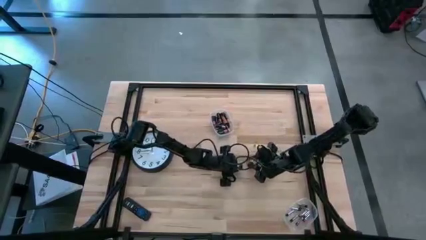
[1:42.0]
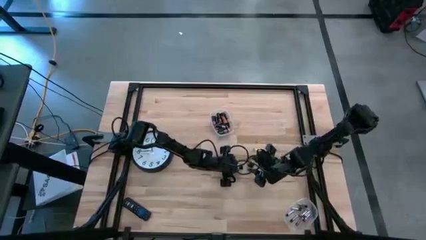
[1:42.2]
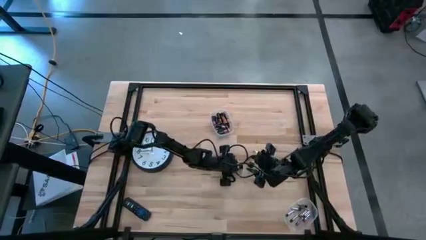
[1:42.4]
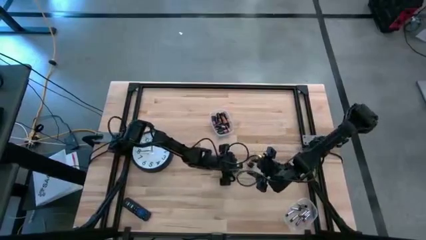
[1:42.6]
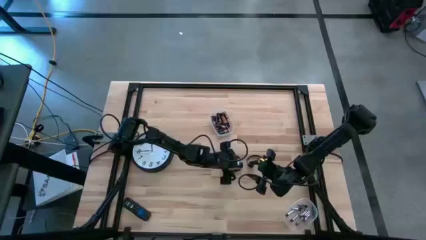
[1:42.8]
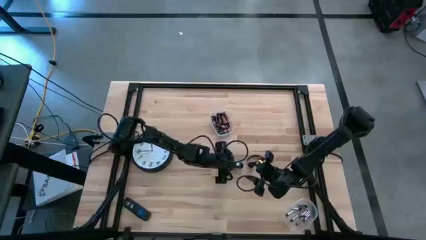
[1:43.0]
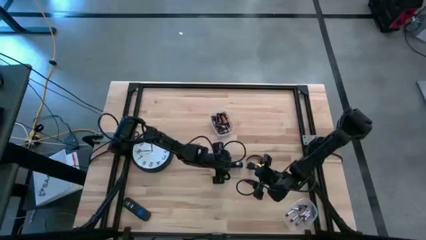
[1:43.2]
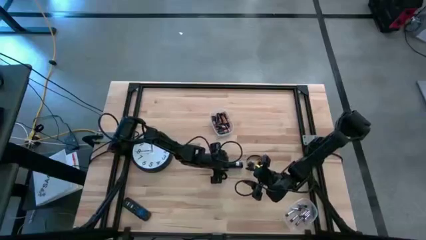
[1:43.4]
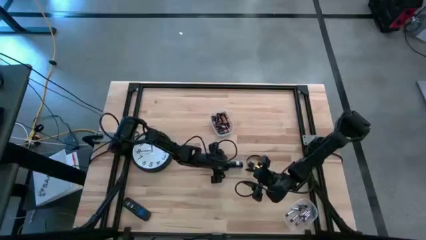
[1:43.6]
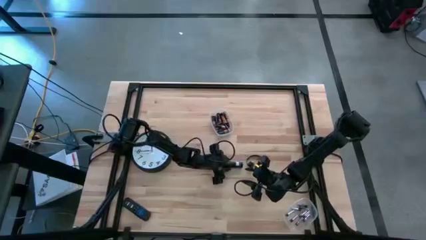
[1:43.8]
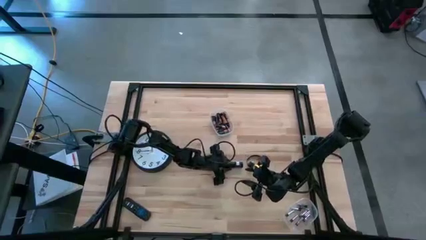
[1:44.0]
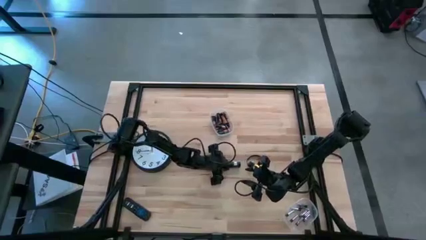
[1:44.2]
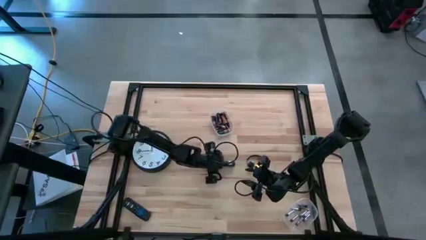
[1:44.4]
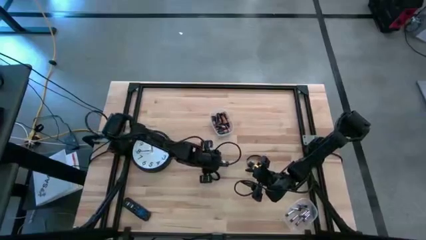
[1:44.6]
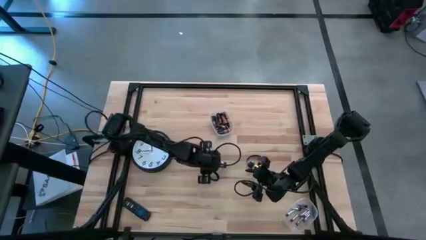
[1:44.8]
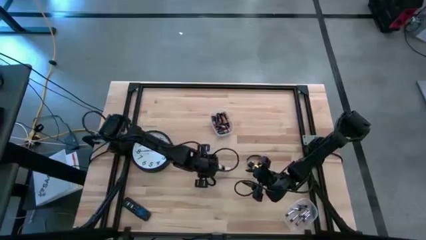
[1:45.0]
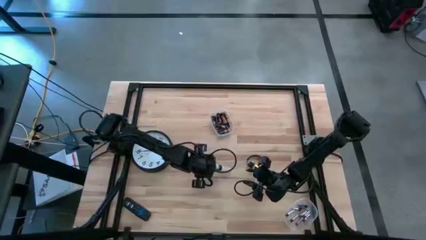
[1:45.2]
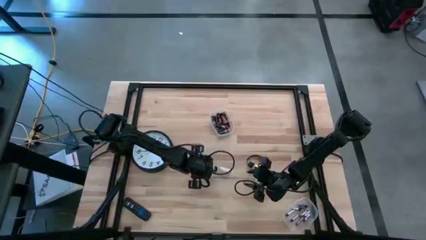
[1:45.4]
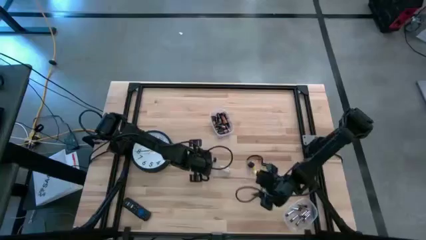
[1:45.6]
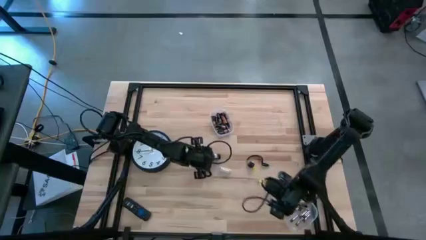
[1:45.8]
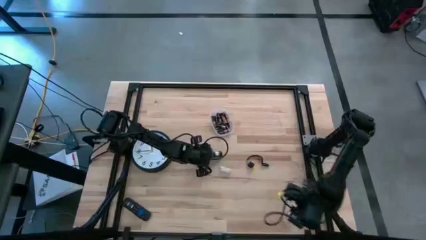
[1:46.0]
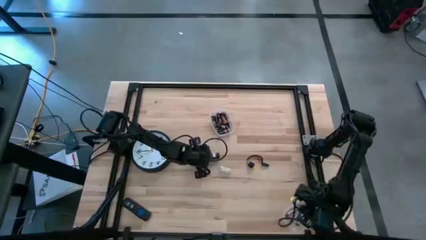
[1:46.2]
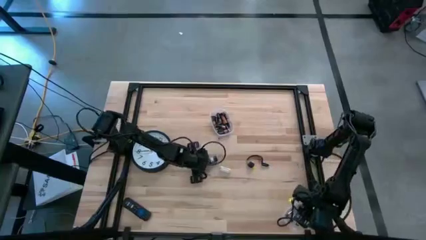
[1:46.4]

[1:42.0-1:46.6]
Task: Insert battery
Remove the battery holder of the flashlight

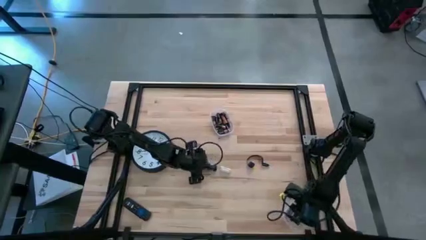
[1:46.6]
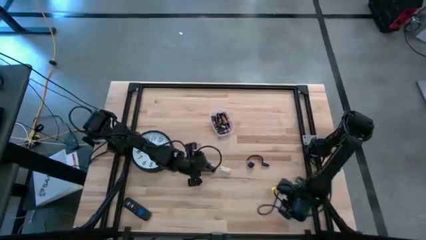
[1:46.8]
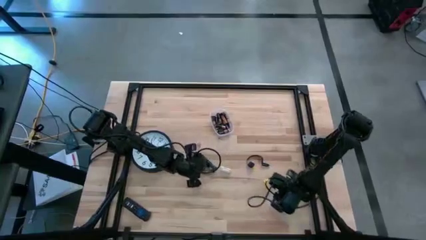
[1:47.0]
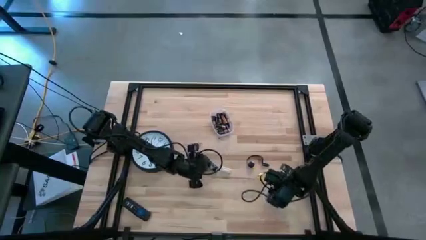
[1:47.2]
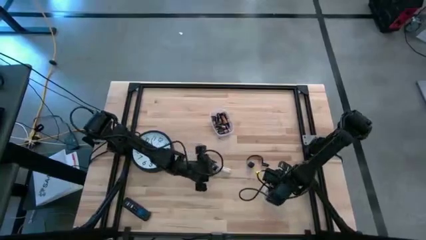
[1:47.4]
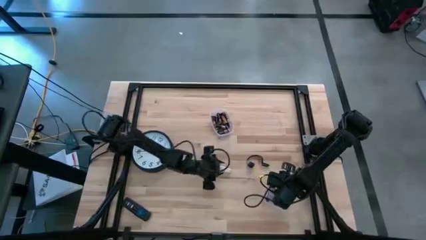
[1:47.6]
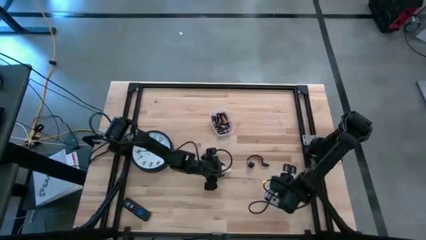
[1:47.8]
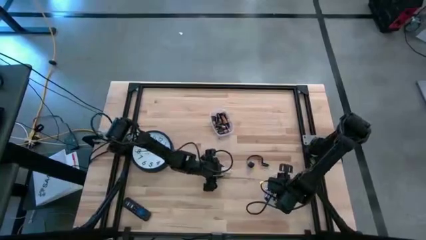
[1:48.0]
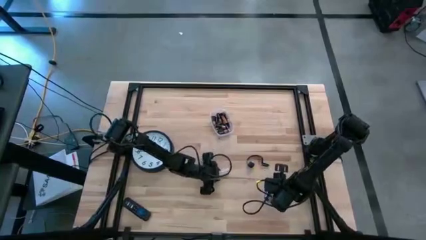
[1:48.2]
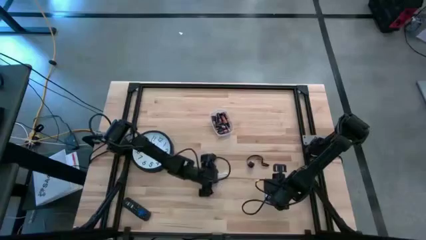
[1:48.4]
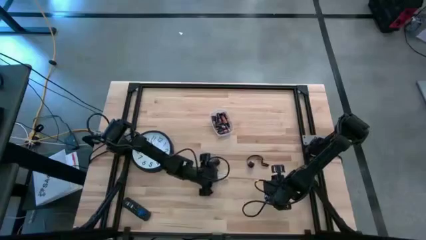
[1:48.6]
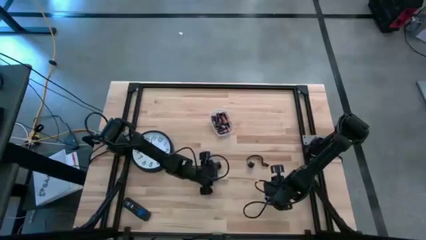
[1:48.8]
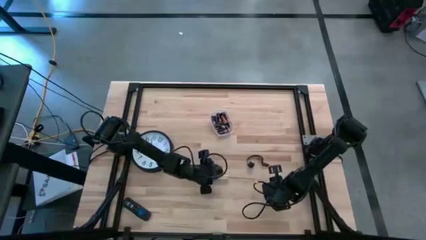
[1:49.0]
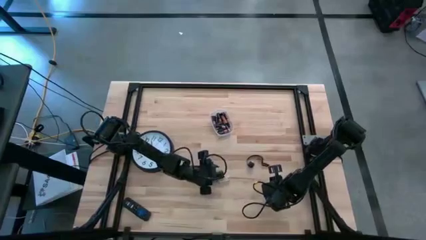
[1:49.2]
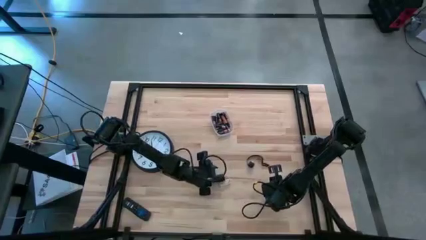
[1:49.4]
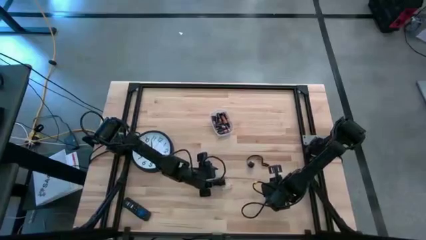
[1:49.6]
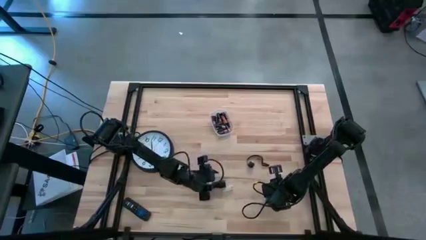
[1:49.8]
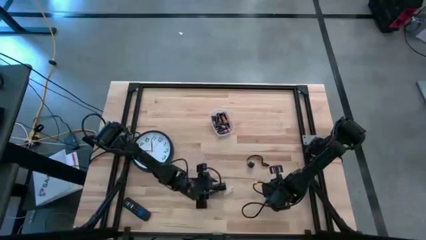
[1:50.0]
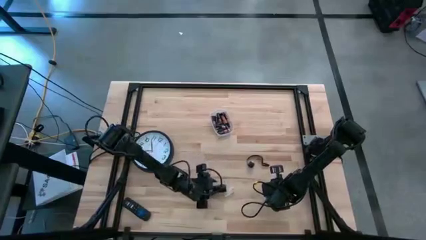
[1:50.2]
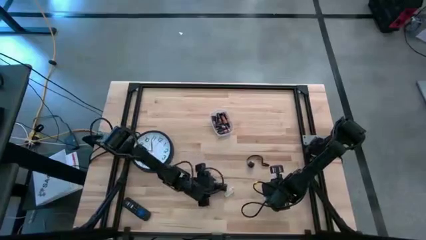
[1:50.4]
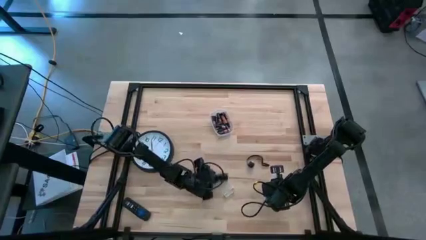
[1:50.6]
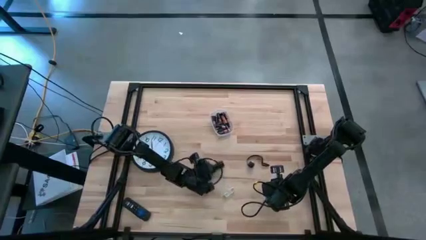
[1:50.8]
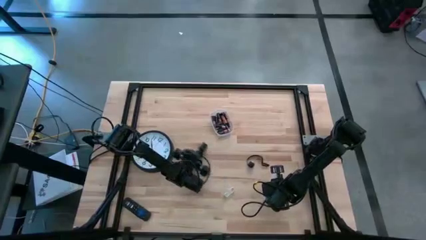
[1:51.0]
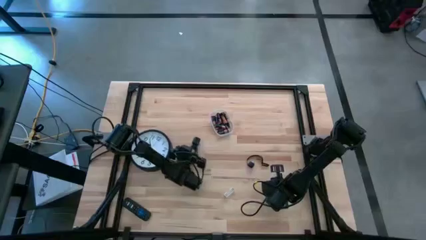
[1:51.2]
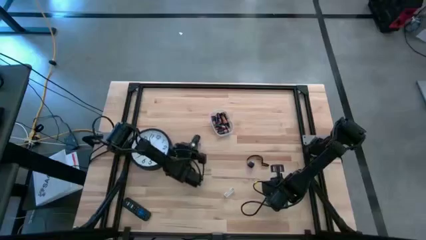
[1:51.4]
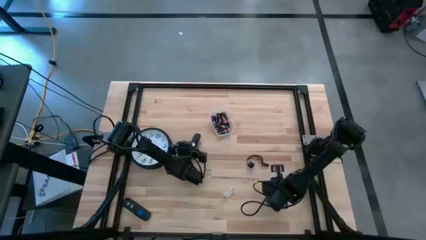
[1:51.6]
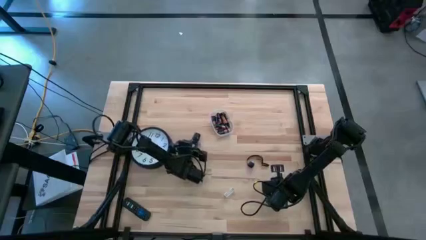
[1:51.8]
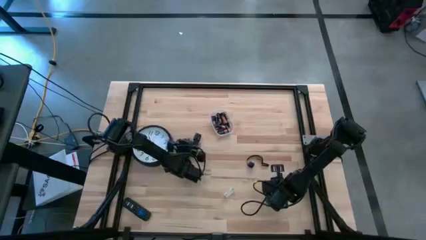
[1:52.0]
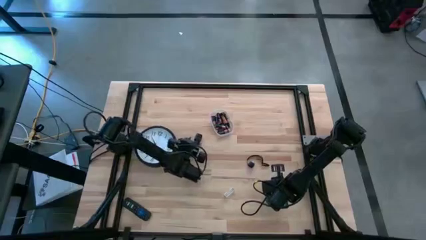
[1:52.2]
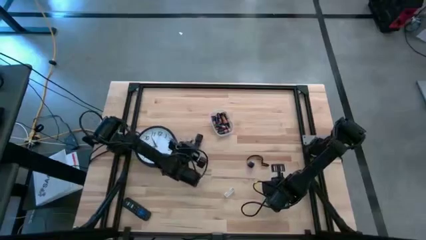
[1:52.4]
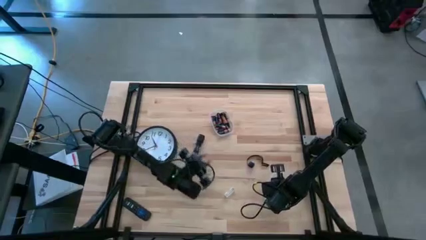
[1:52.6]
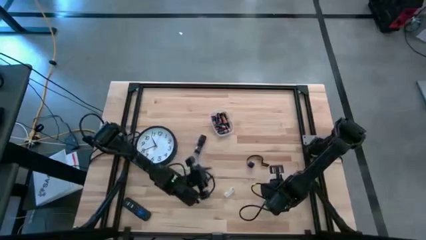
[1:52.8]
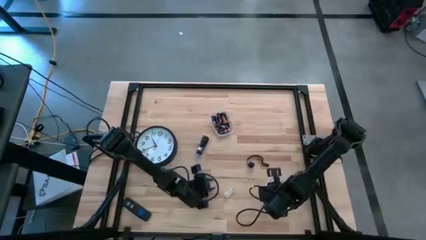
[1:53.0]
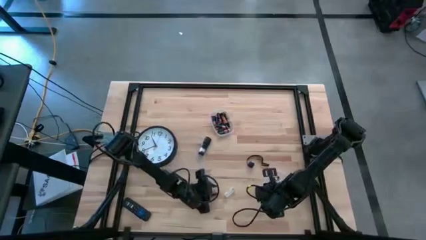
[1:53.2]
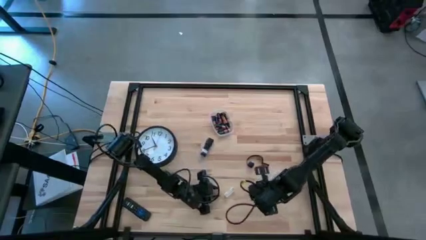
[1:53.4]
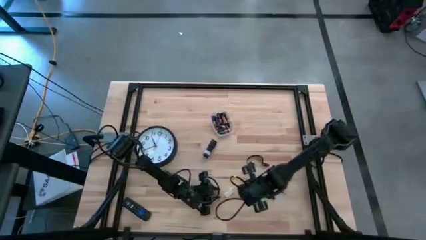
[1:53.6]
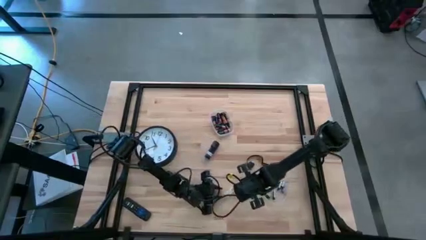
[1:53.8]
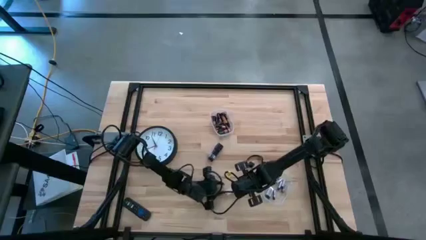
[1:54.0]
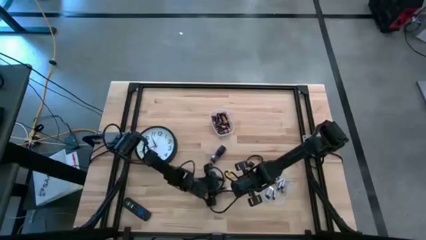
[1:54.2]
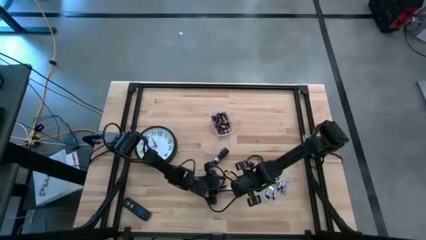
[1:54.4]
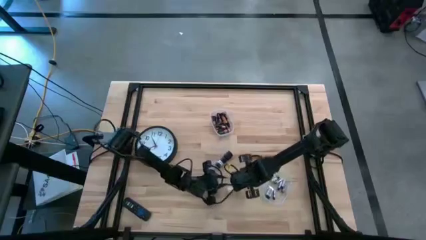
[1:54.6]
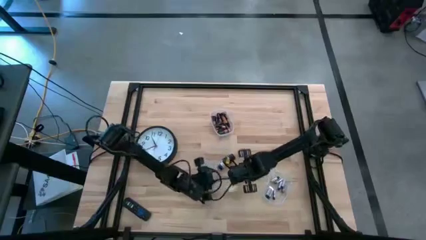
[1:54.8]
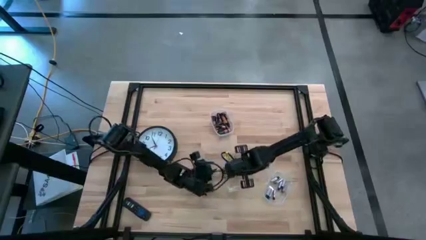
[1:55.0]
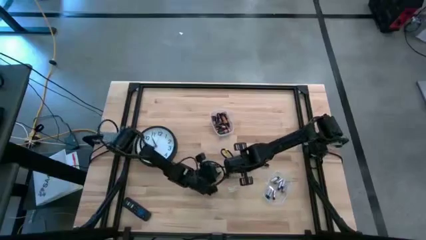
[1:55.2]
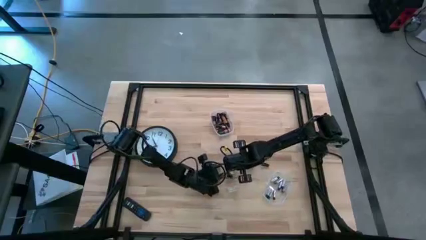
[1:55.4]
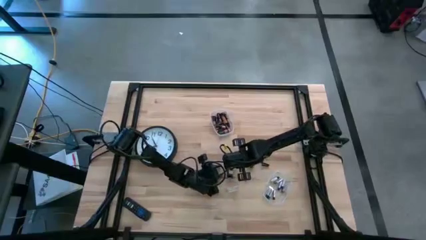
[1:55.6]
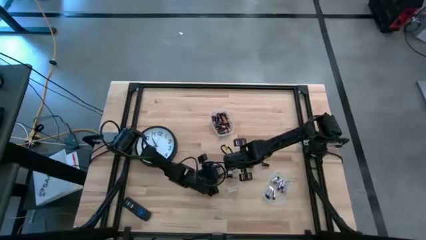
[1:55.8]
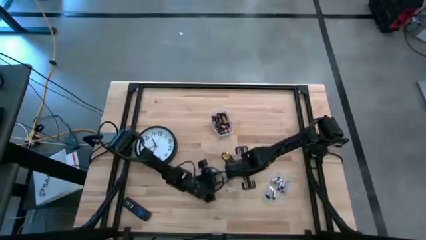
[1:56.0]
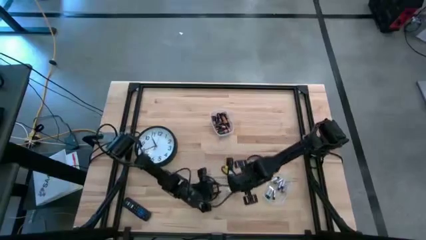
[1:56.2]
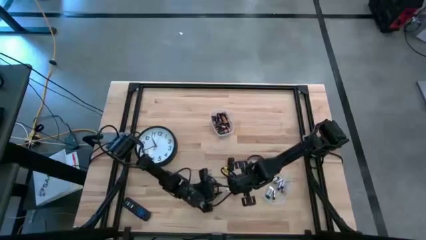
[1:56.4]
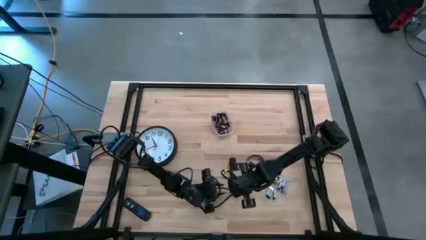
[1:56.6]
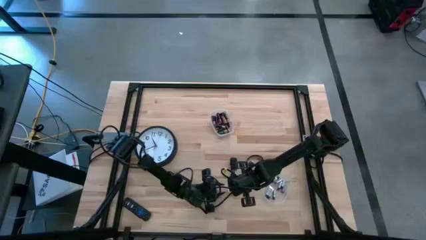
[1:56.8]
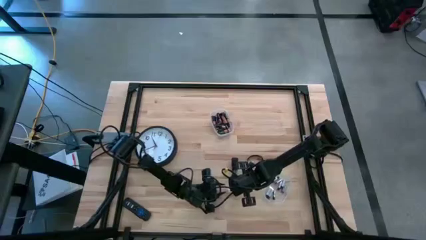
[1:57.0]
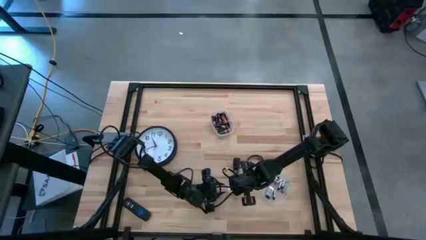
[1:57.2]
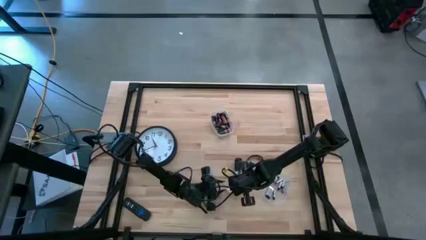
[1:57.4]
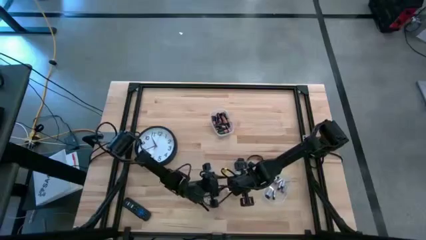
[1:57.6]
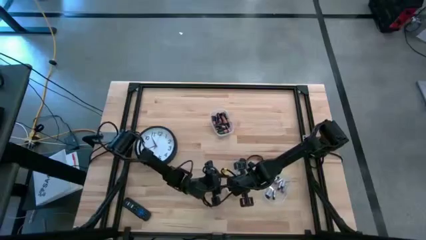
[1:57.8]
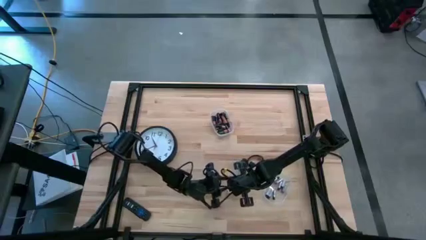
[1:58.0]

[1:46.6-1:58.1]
Insert the silver battery into the battery holder
